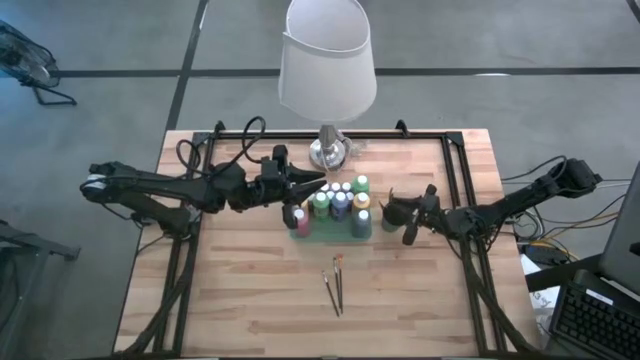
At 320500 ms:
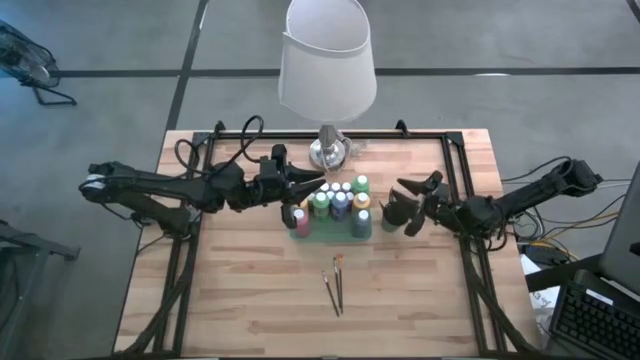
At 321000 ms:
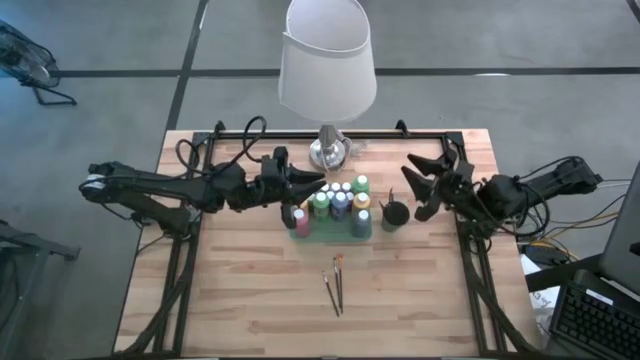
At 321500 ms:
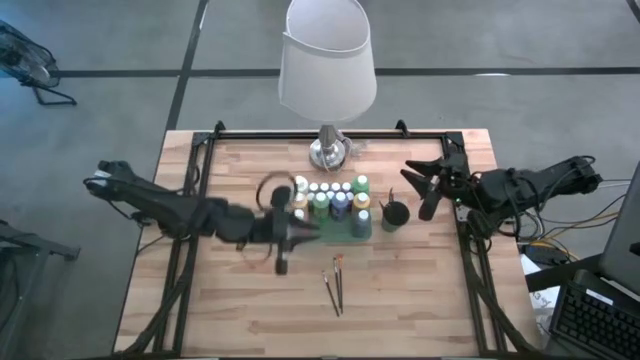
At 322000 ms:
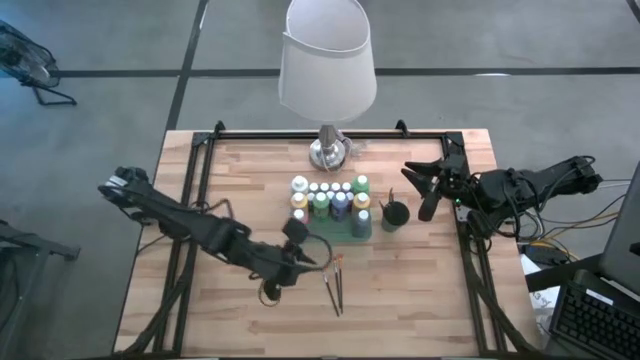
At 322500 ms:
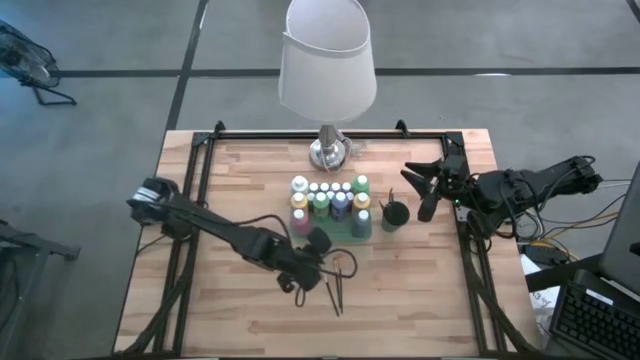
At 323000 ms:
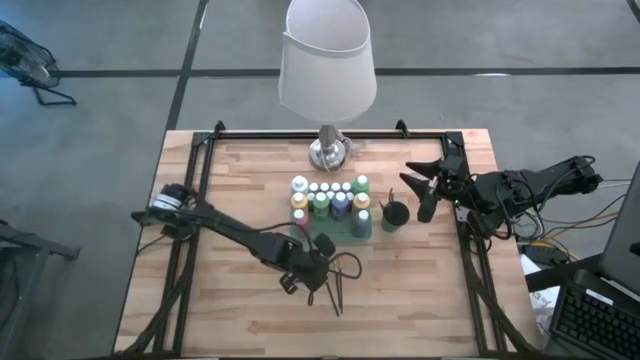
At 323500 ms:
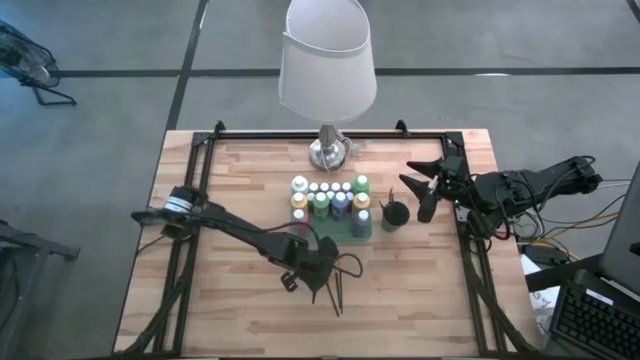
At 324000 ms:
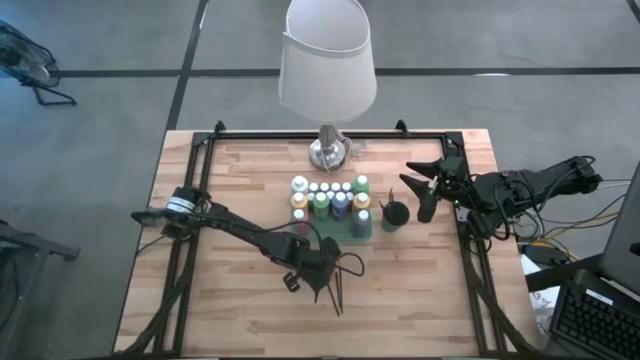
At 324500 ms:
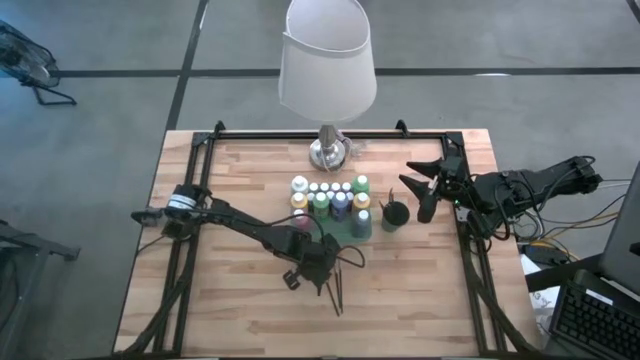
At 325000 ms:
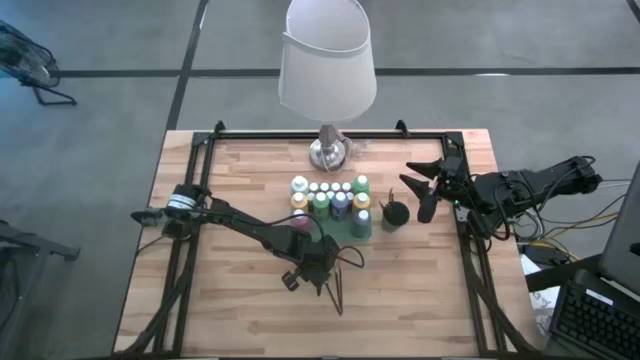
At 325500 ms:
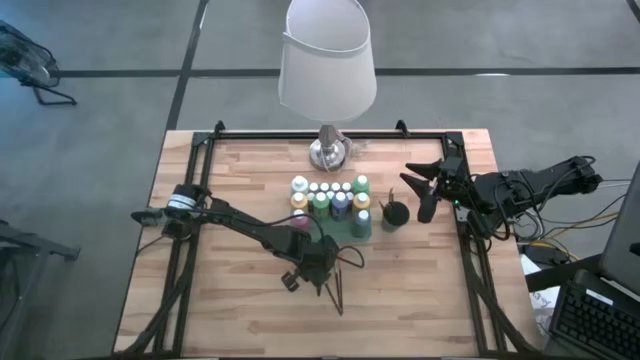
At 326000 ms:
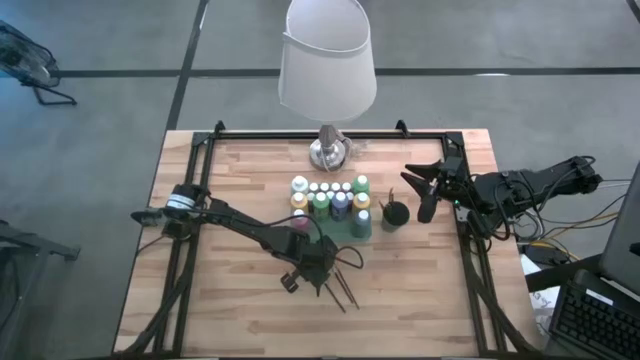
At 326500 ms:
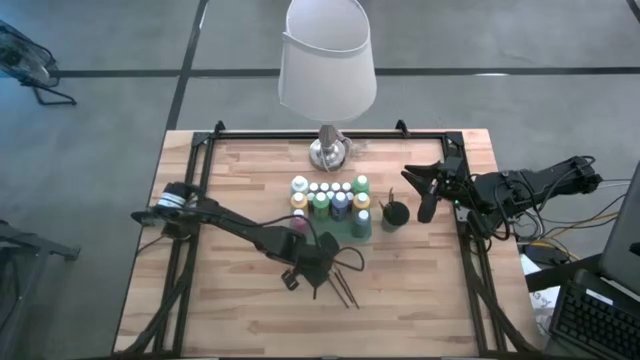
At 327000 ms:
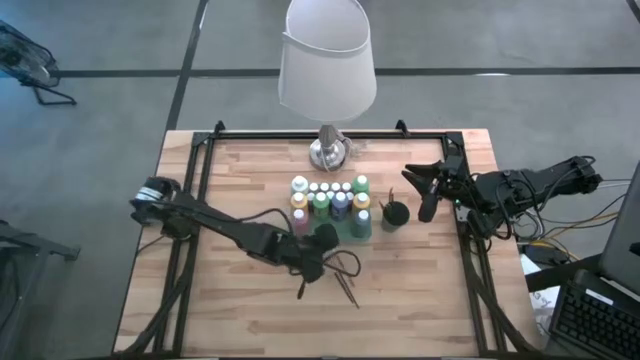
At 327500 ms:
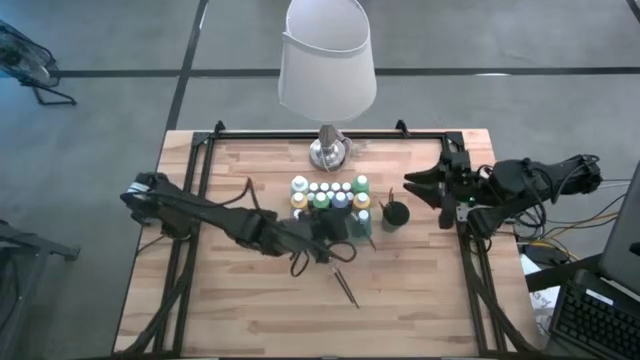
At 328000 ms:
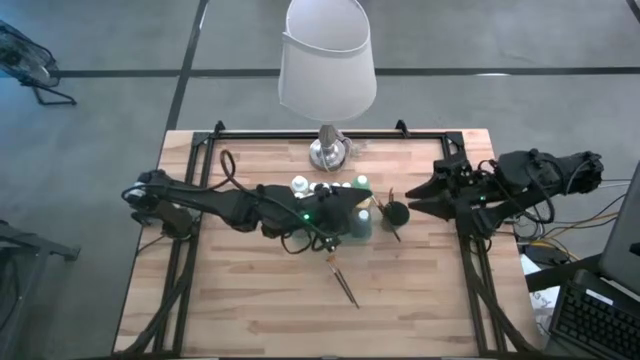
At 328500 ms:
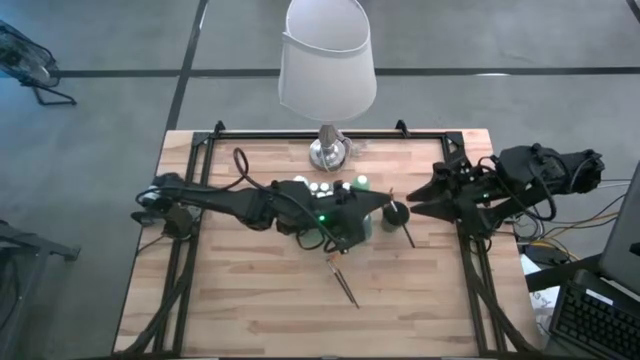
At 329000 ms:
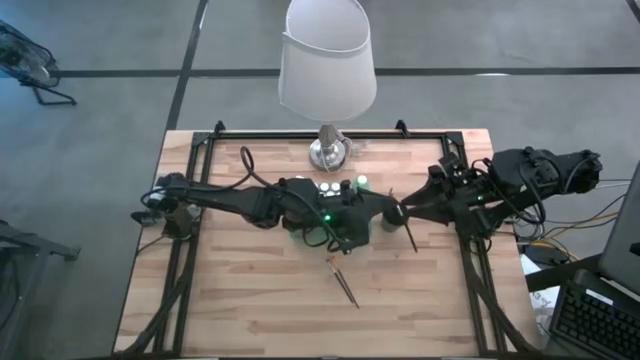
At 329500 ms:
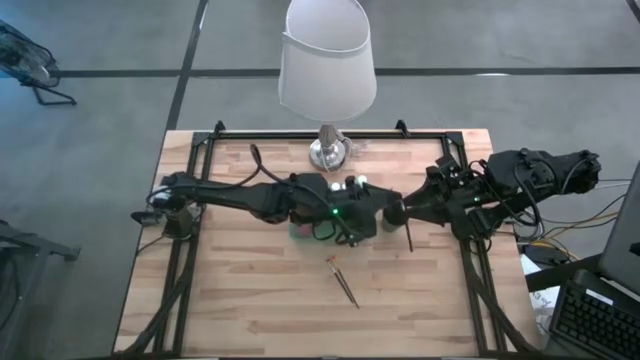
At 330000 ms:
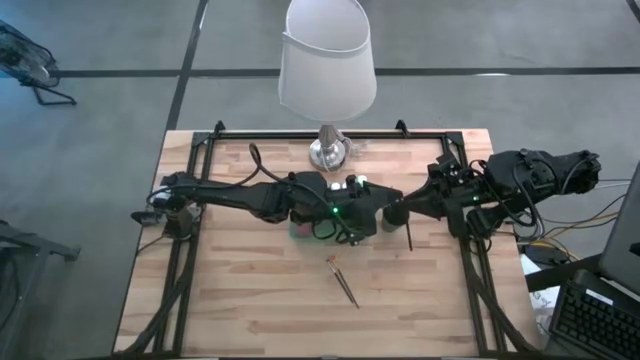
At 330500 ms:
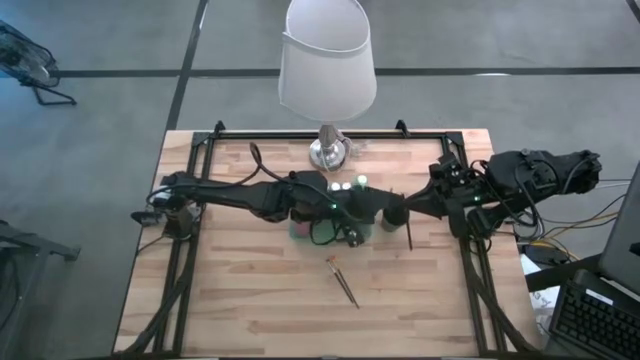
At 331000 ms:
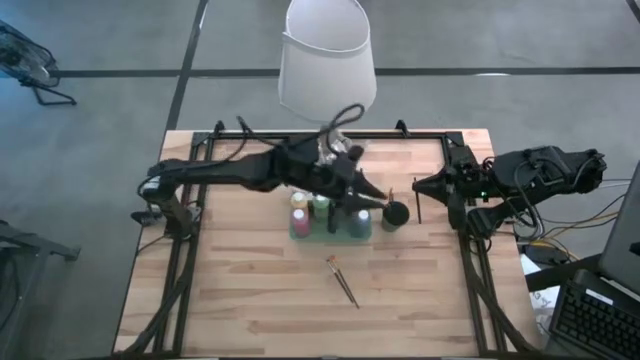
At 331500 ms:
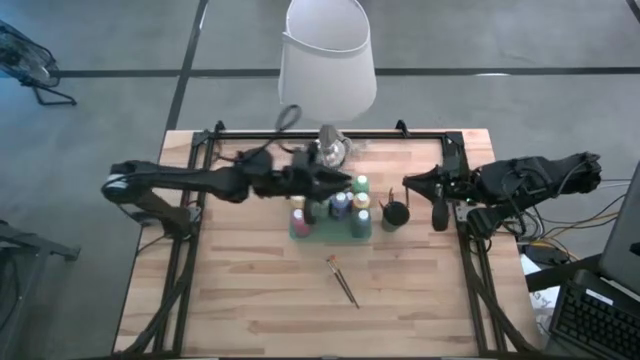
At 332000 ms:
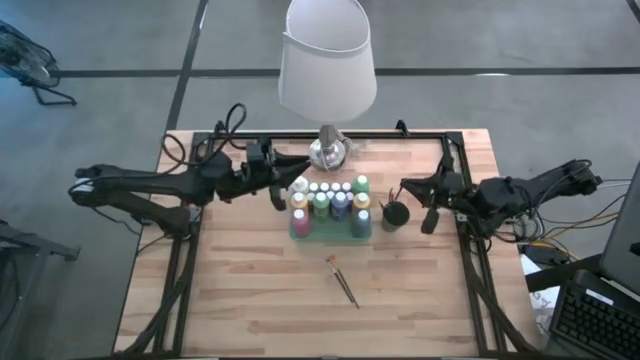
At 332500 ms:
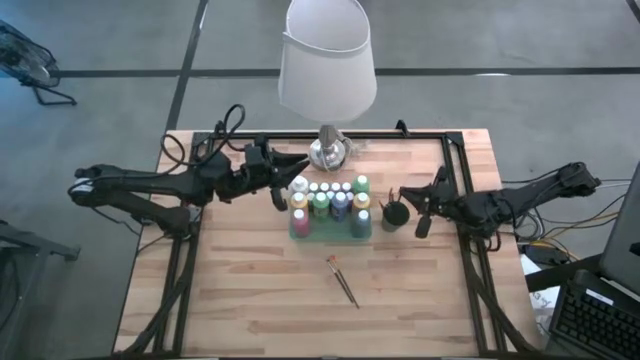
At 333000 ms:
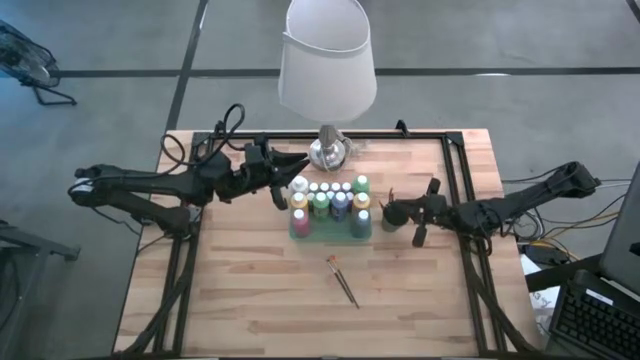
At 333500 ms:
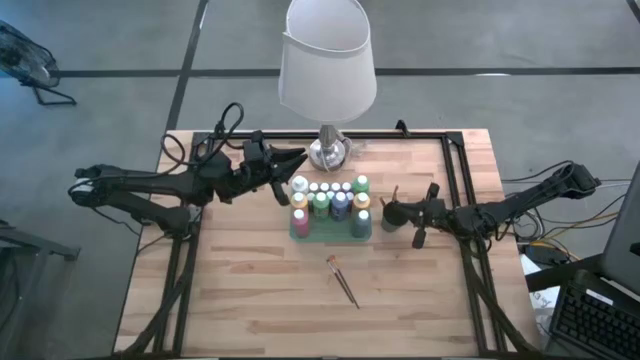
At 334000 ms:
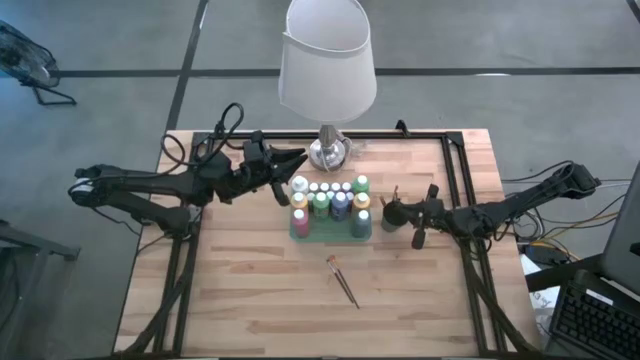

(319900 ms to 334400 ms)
Task: Pick & Place Paint Supplies
Put the black paint brush into the black cup

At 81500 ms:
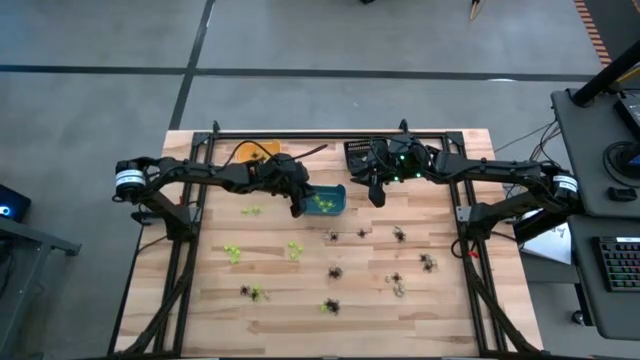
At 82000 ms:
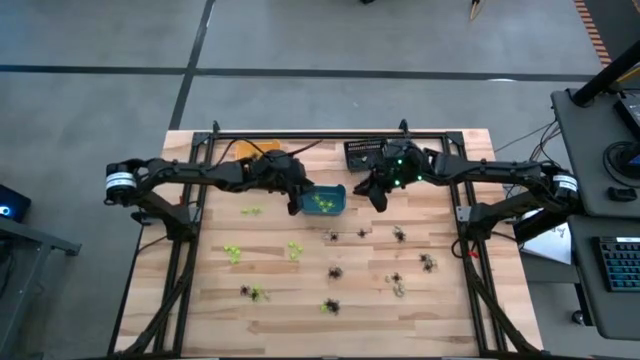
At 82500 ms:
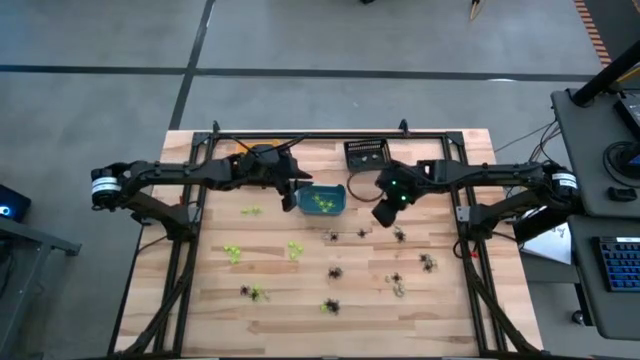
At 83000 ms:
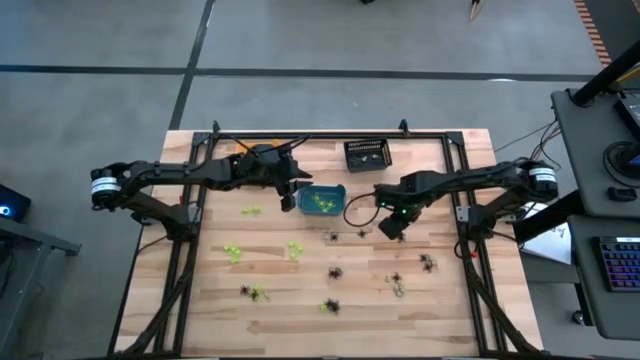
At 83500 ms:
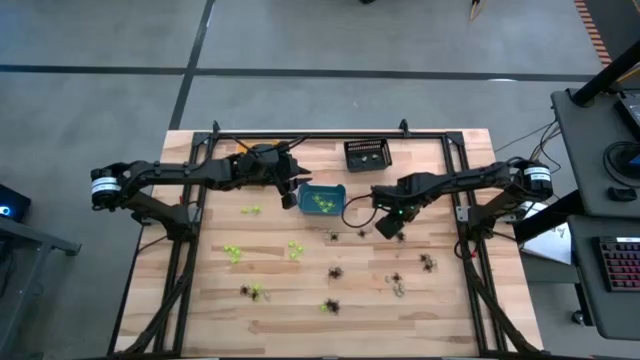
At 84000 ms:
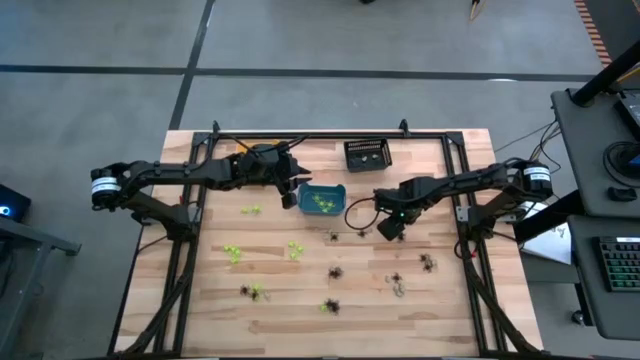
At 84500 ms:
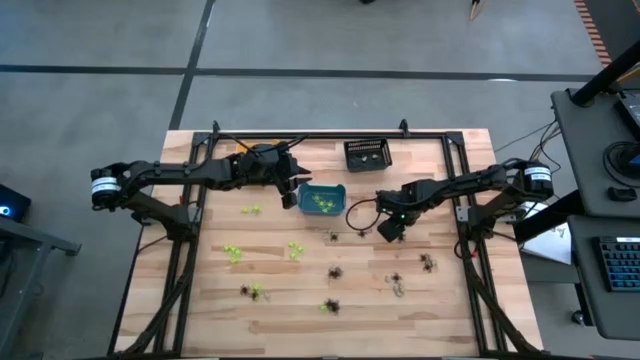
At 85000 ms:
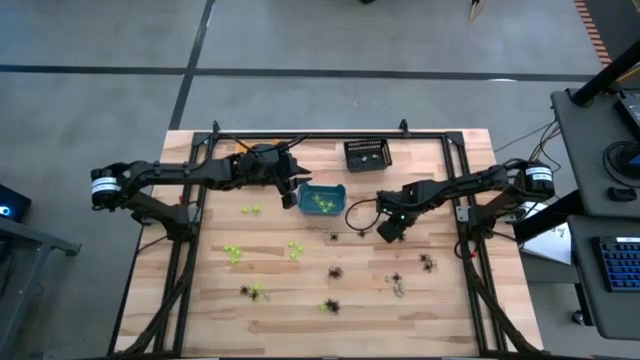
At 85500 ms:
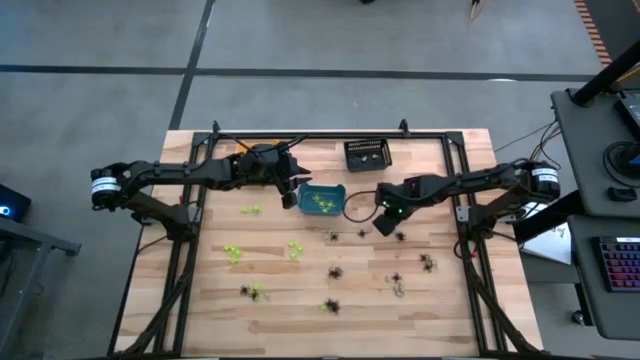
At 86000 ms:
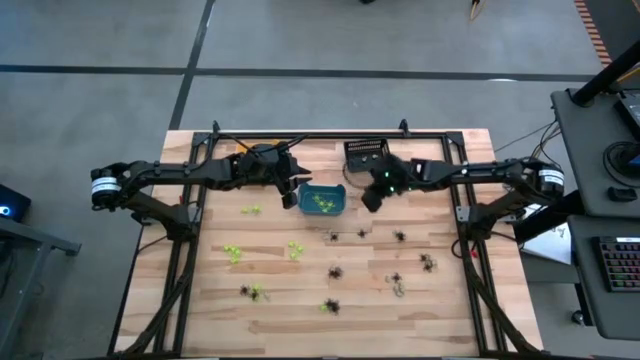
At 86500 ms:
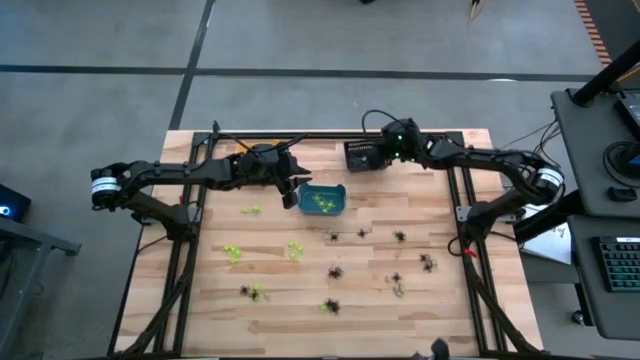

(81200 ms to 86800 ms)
Task: Sort Halloween decoration
Put the white skull toy into the black bin
